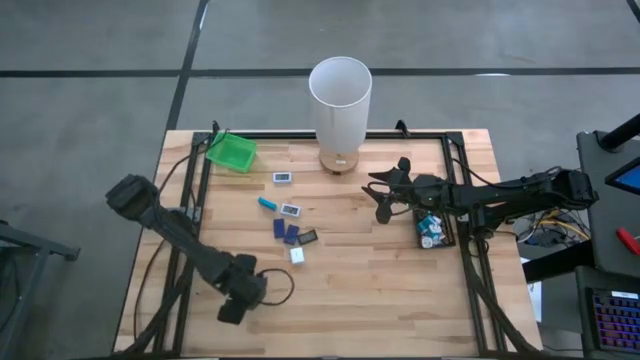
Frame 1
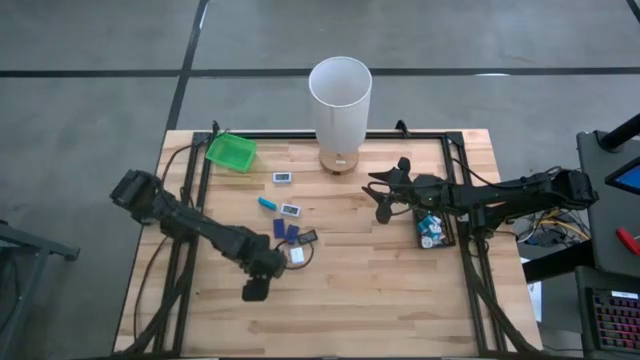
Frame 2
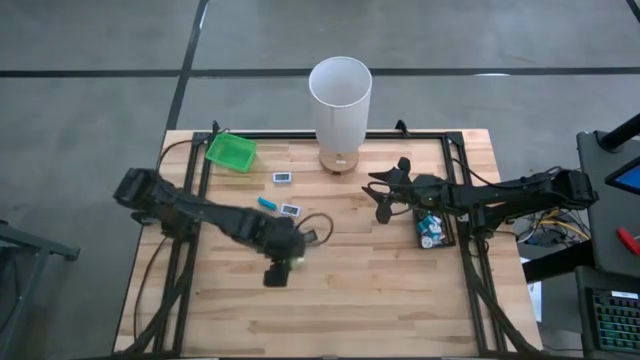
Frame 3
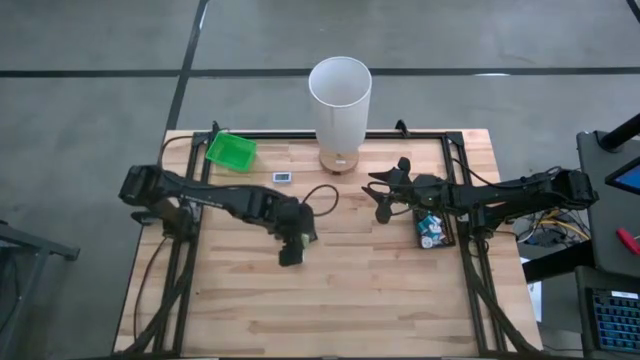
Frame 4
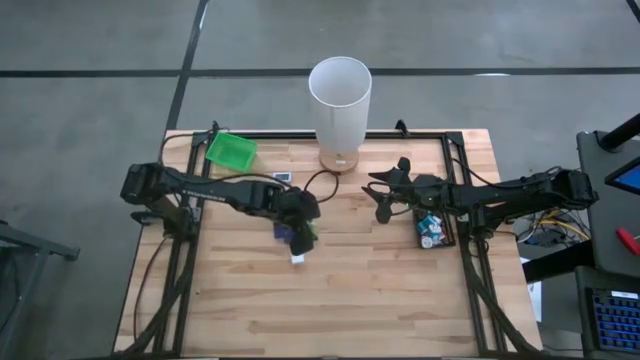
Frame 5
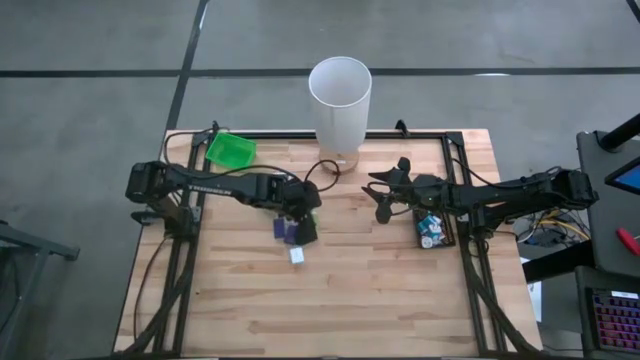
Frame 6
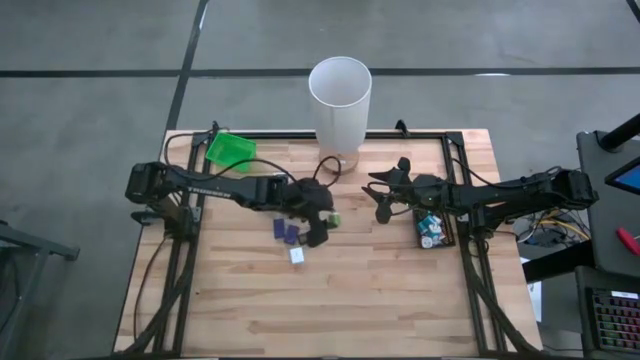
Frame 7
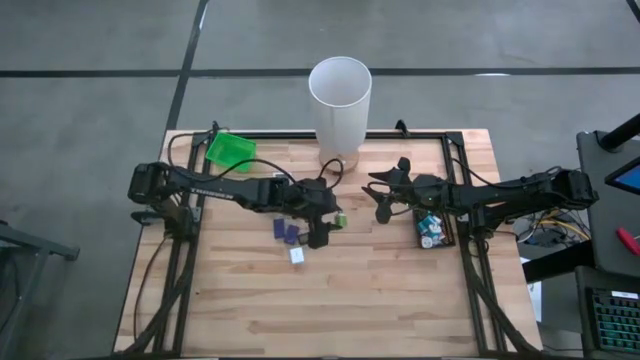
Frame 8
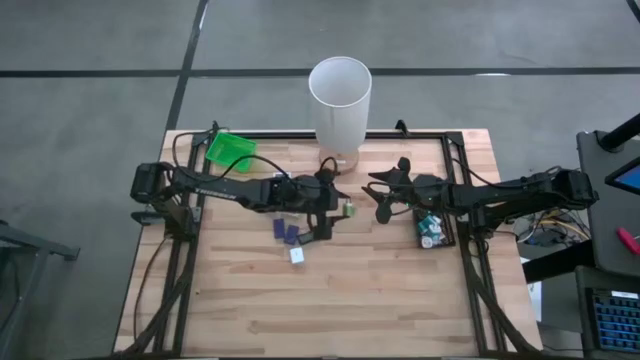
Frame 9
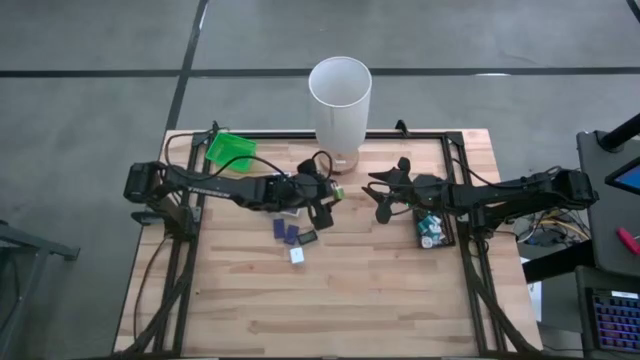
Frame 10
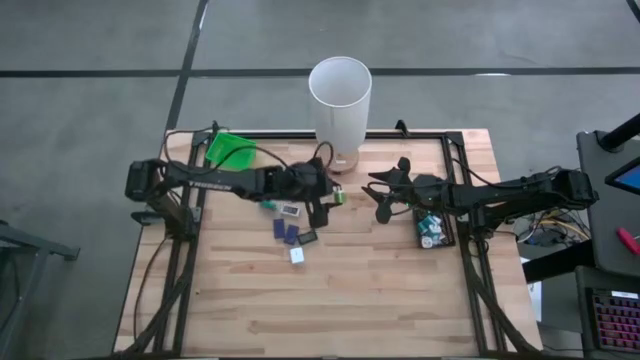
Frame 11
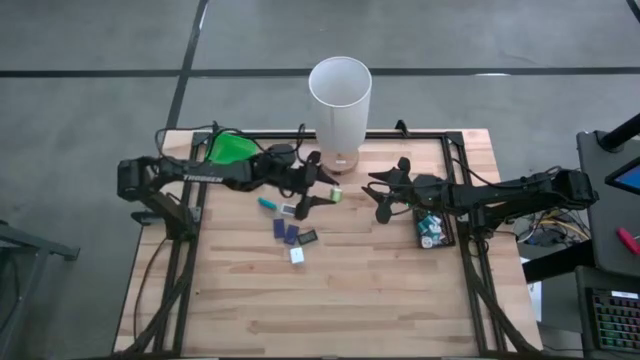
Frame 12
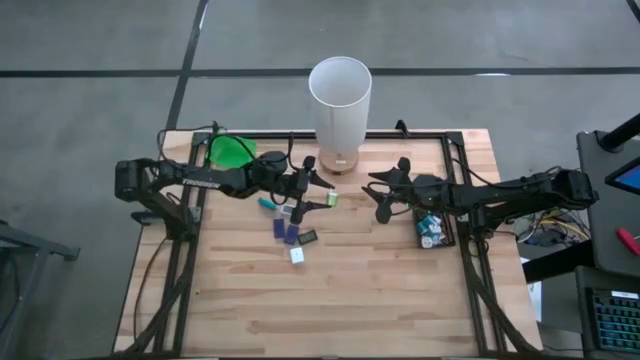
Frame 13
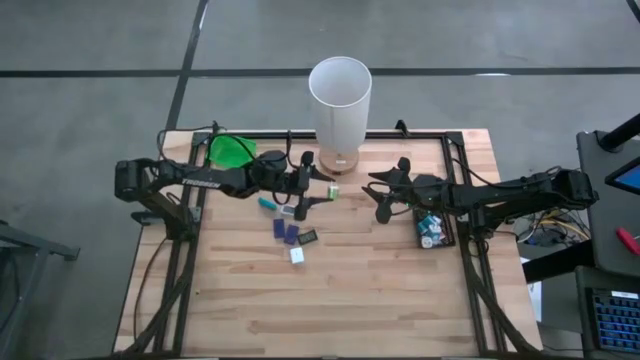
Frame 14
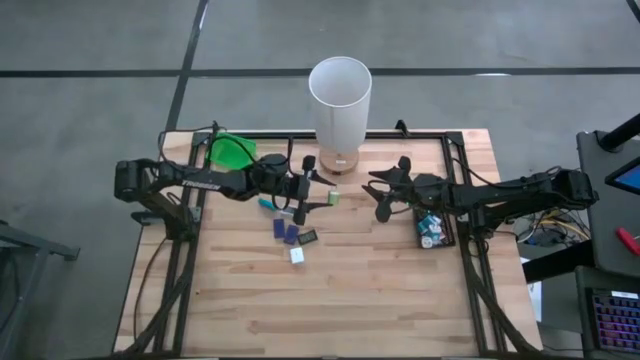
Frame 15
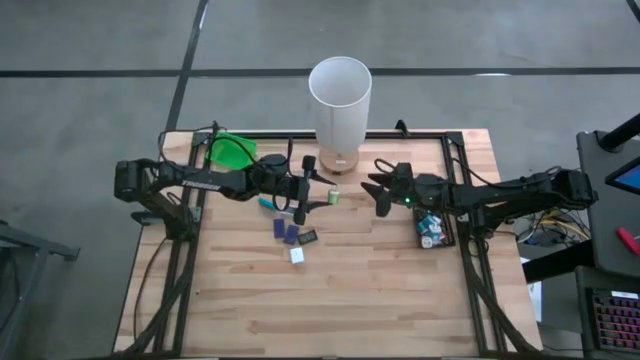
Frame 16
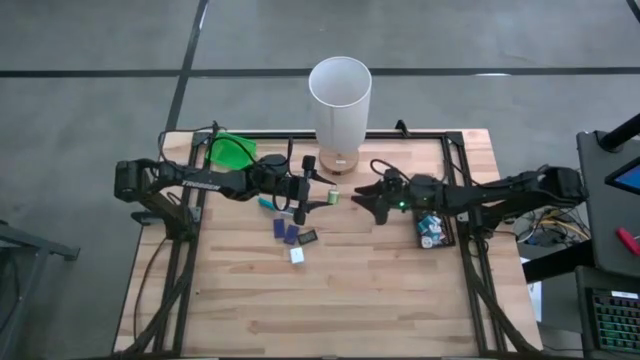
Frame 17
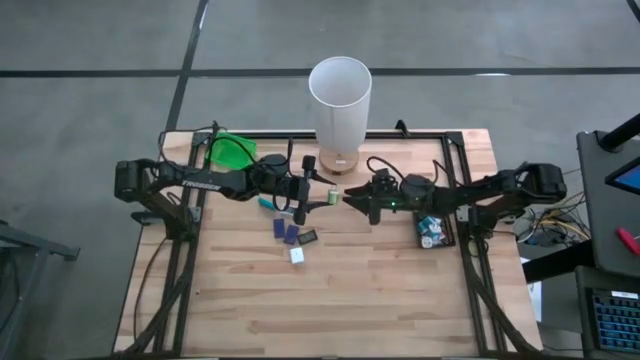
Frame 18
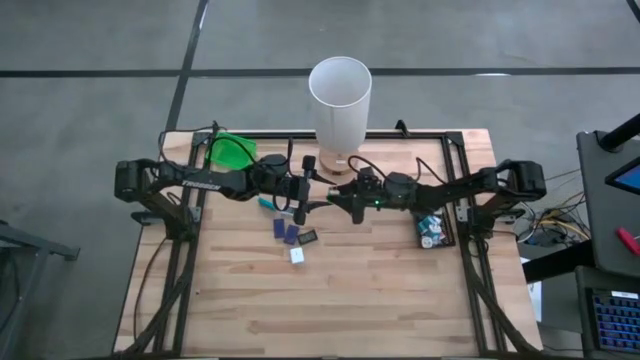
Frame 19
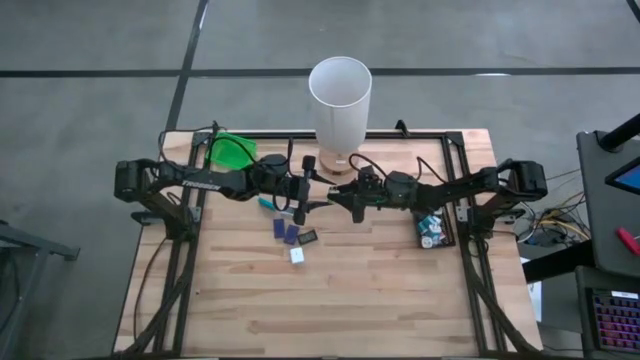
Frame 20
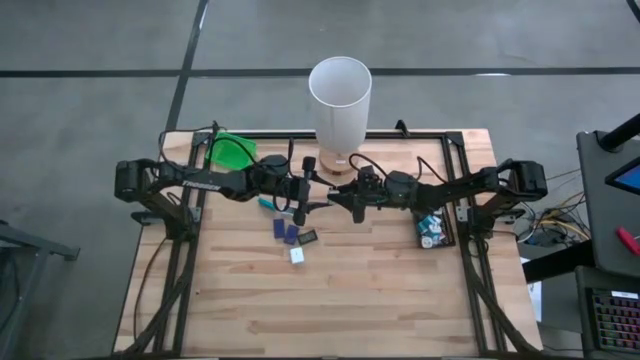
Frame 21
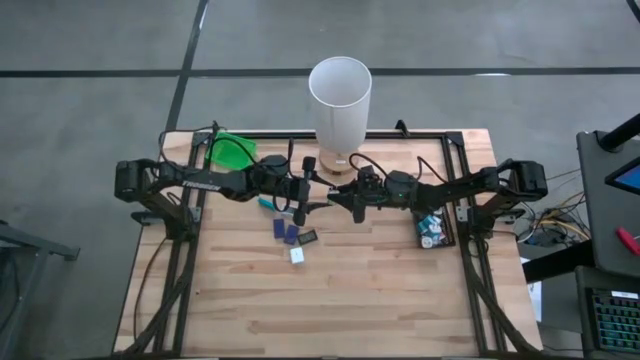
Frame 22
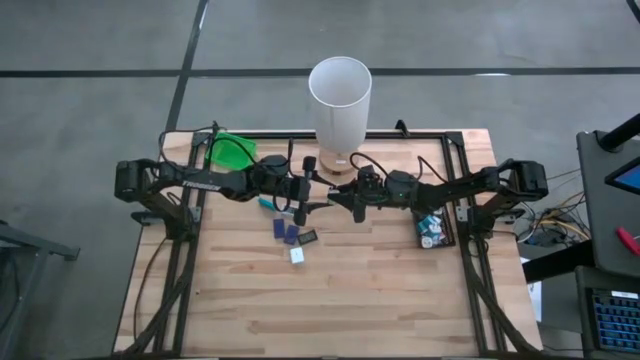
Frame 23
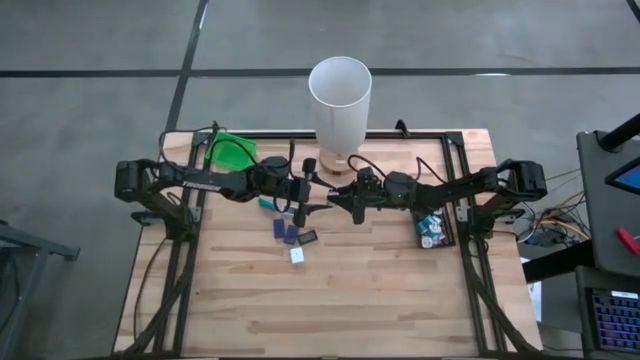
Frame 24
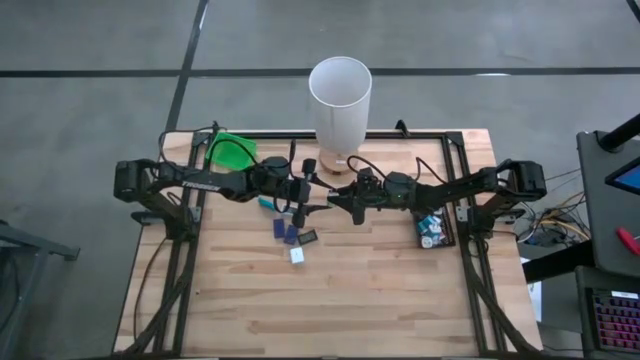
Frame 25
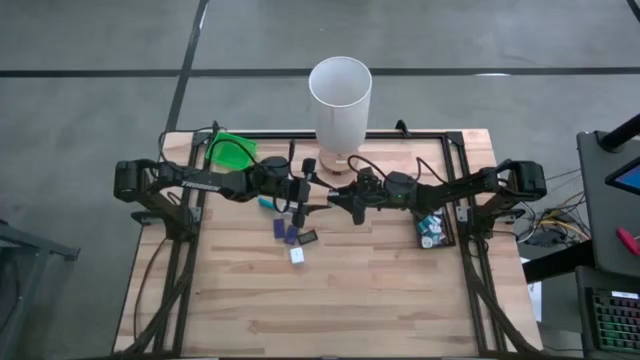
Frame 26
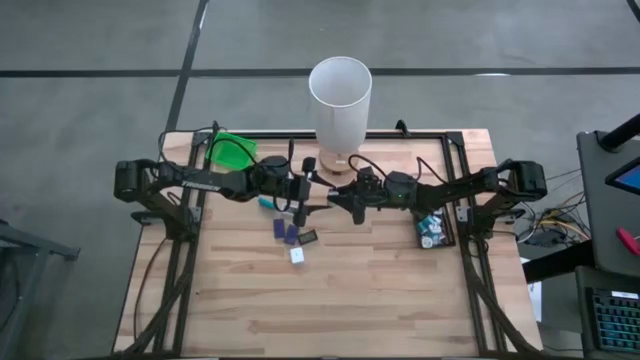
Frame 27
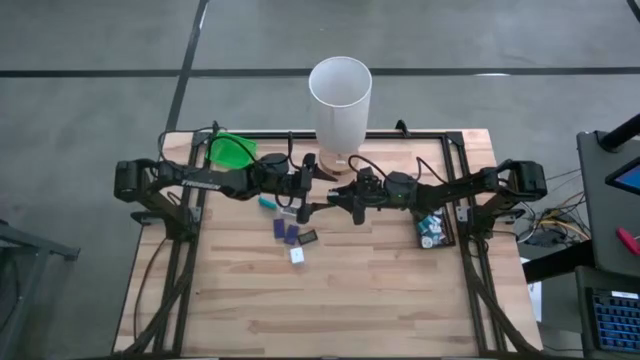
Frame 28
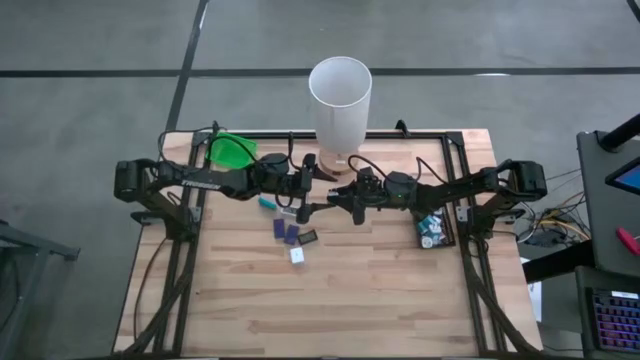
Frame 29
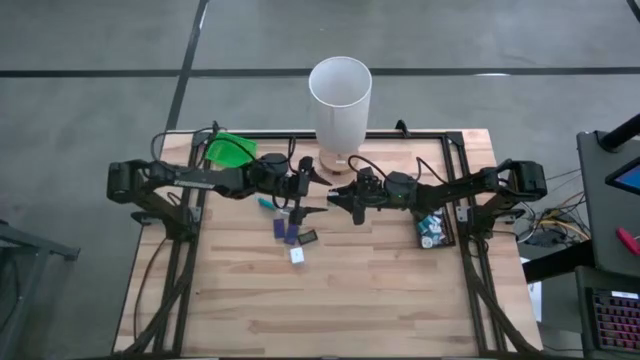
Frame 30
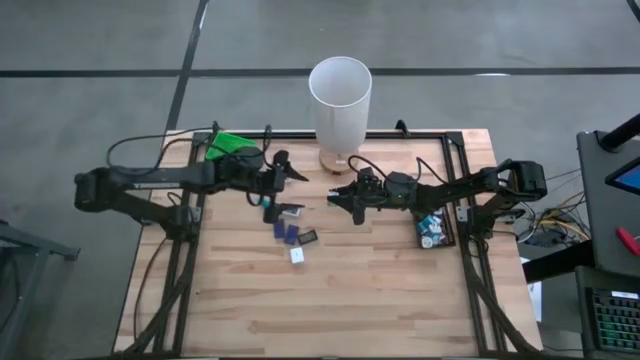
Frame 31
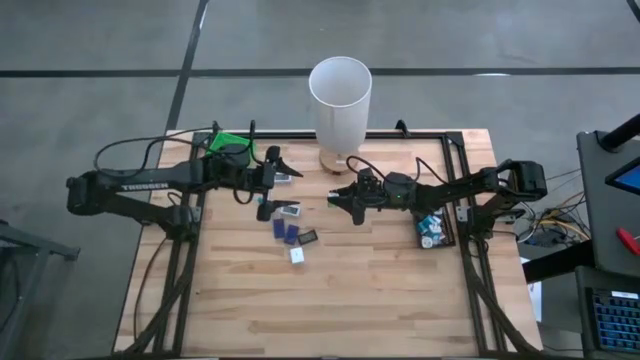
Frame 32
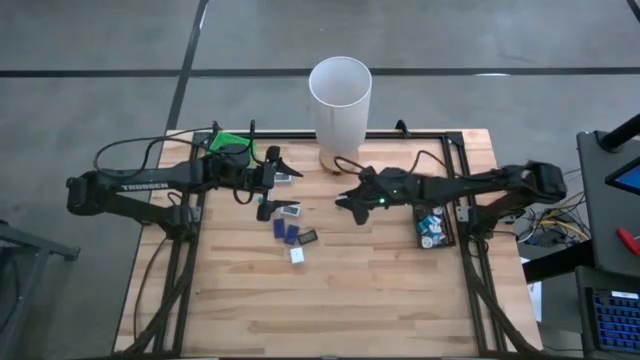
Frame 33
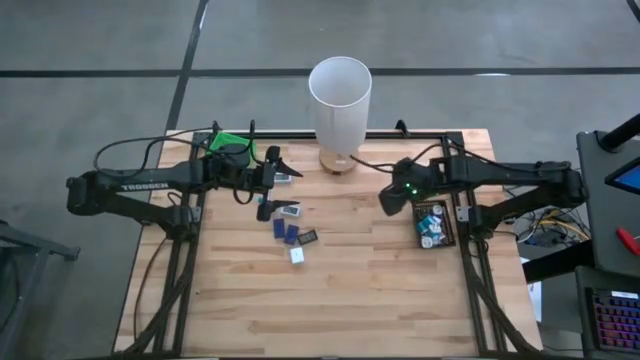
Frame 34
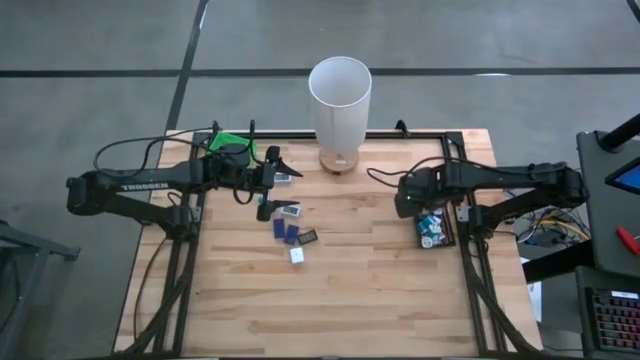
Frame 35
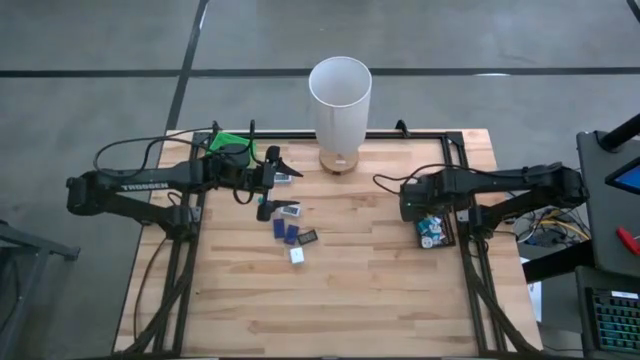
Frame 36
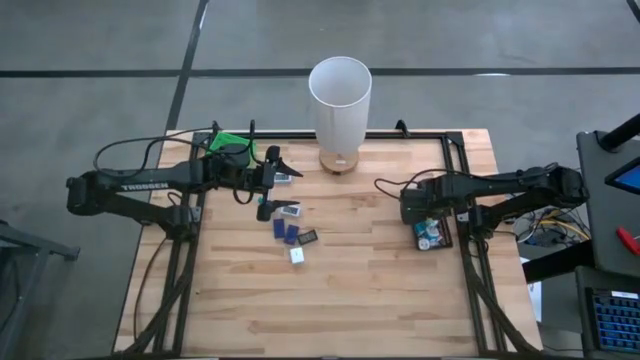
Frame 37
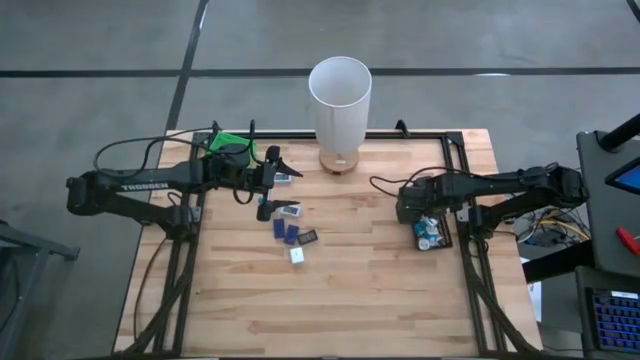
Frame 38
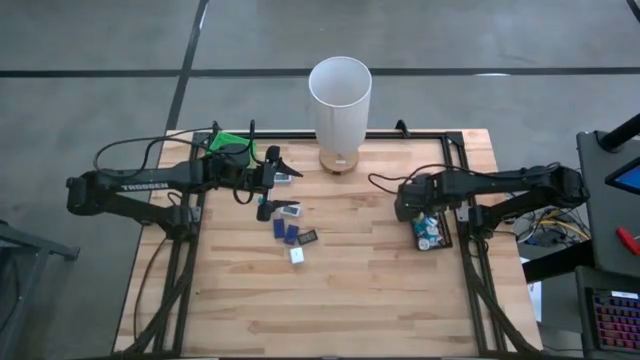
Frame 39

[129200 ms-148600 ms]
Task: Pick & Place Office items
Put the green charger adapter into the black bin

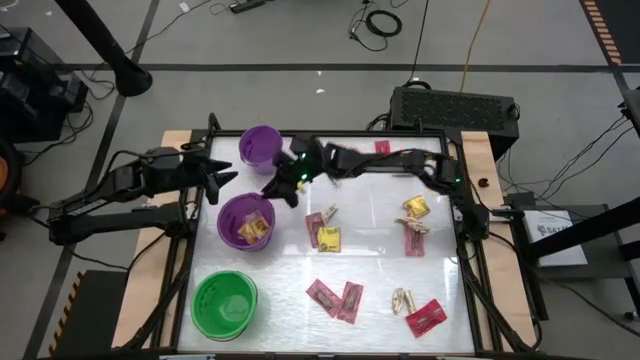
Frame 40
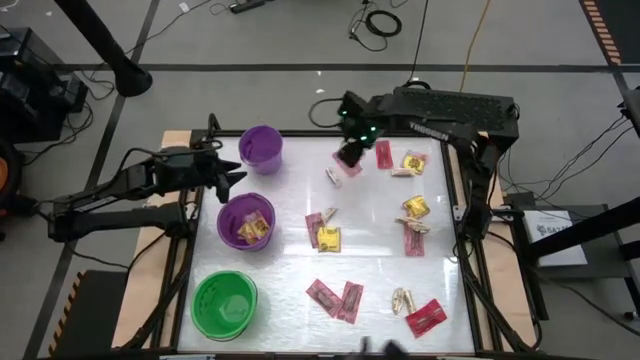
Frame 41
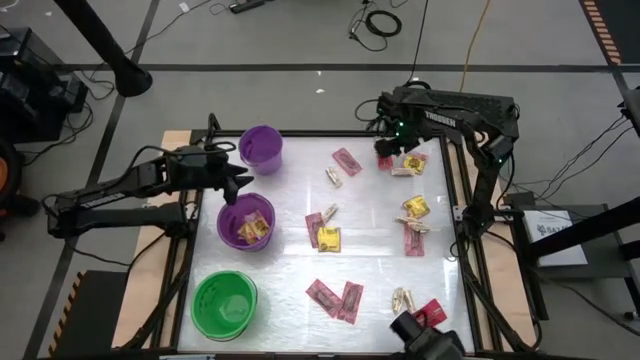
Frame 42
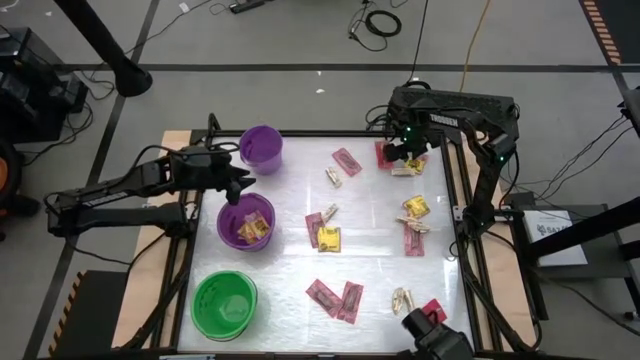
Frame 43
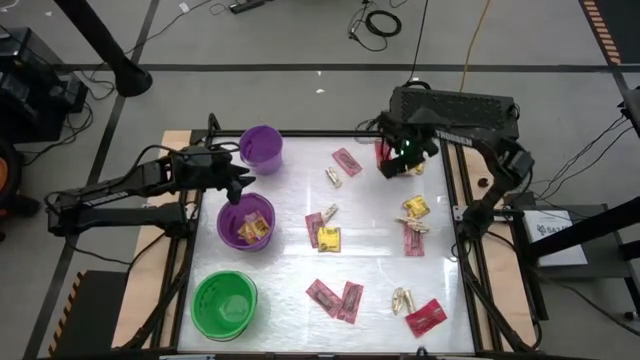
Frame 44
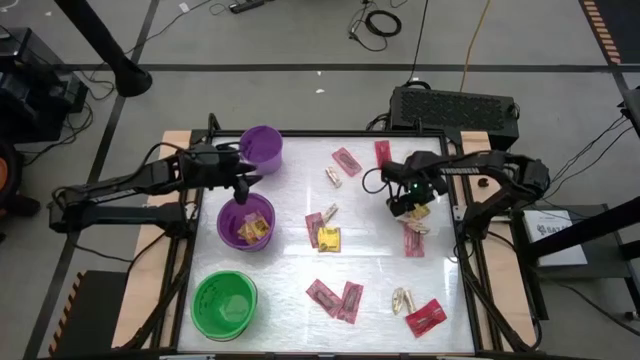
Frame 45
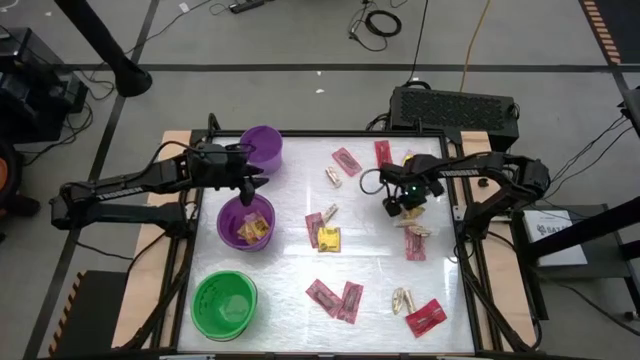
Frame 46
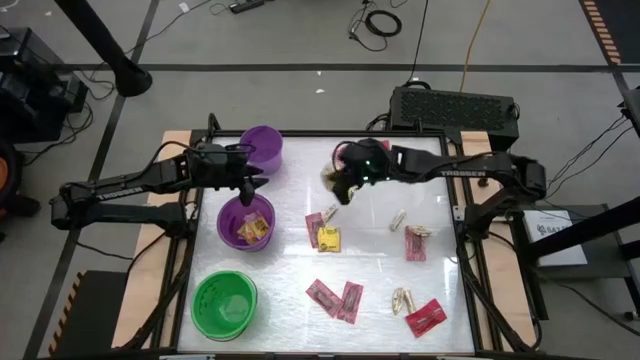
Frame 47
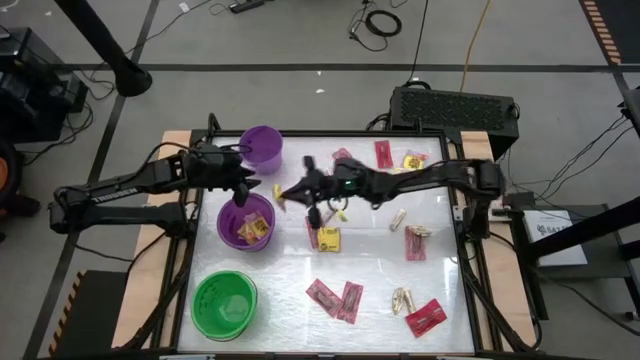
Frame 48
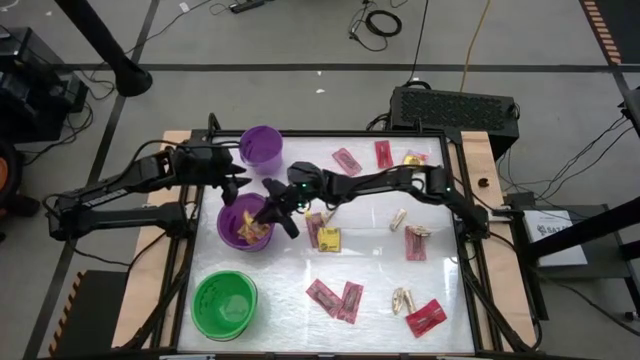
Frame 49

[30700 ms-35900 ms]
Task: Sort candy by brand, put in halloween buckets
Put the yellow candy into the bottom purple bucket
